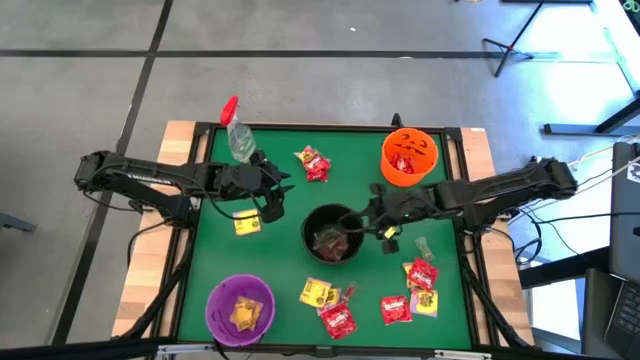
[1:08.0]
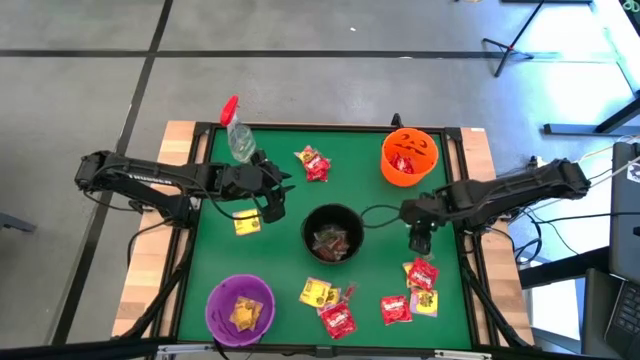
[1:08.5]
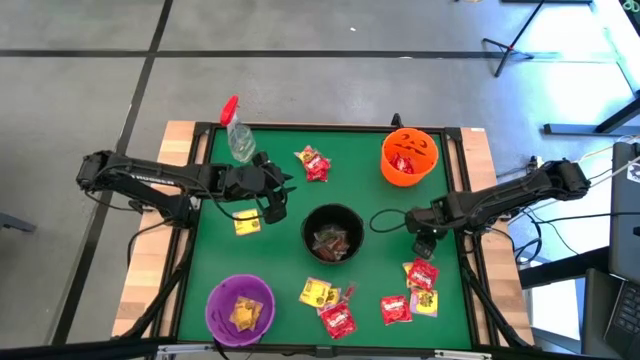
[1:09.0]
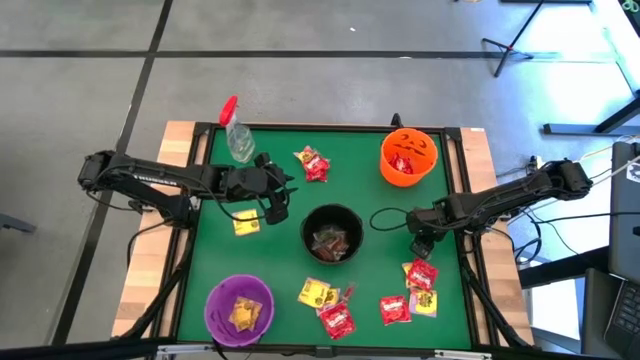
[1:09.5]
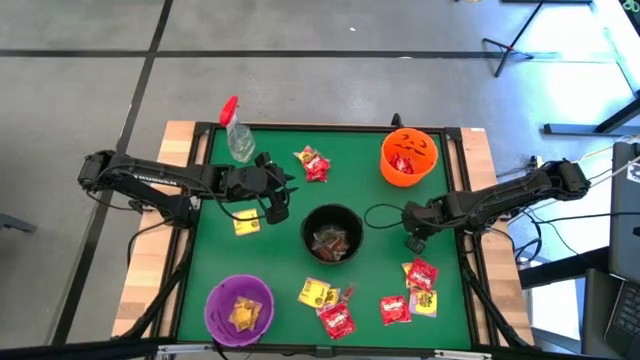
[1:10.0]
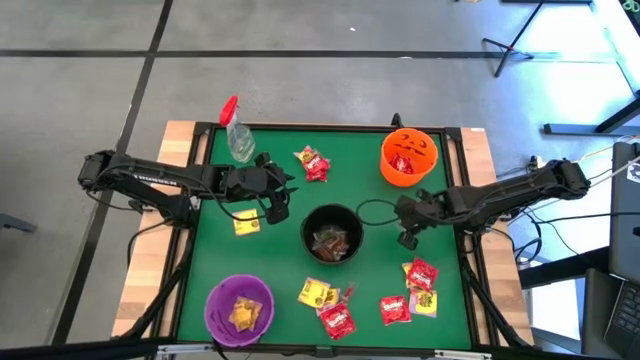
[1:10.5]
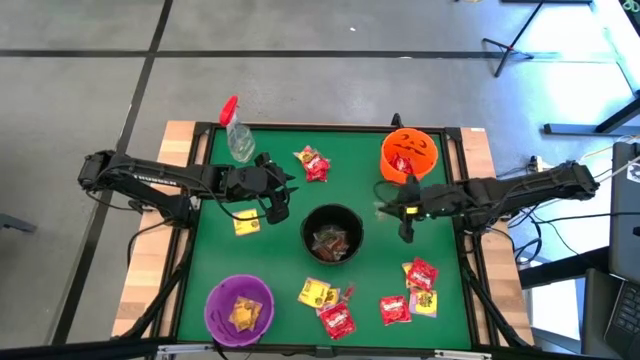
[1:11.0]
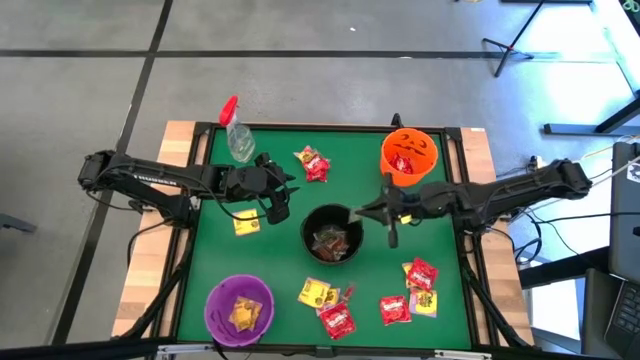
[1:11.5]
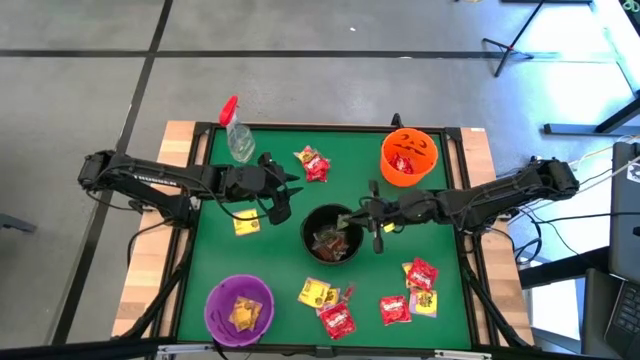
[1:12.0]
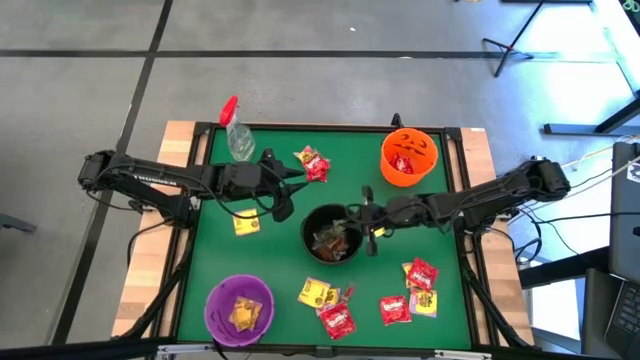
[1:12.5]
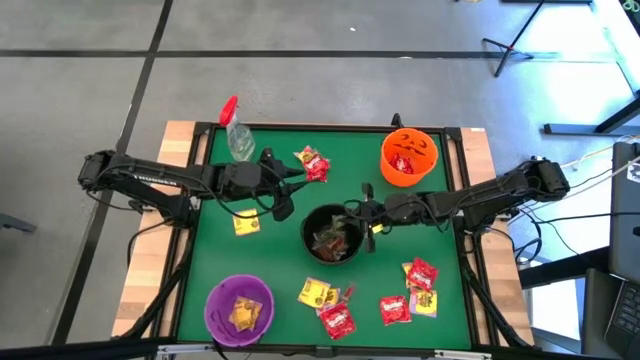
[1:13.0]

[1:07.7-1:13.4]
Task: Sort candy
Put the green candy into the black bucket

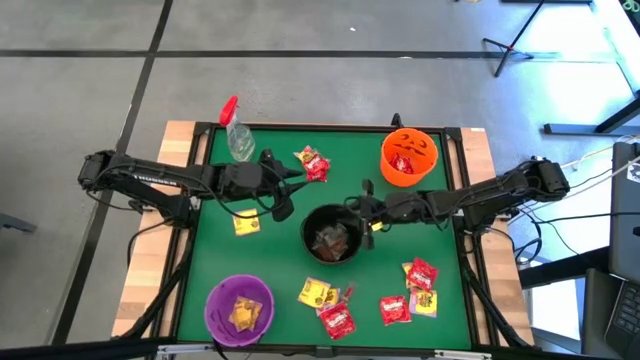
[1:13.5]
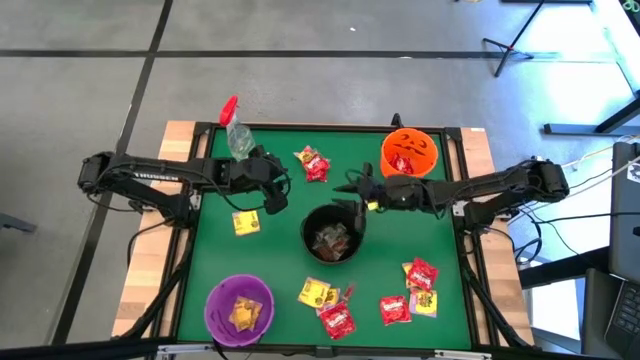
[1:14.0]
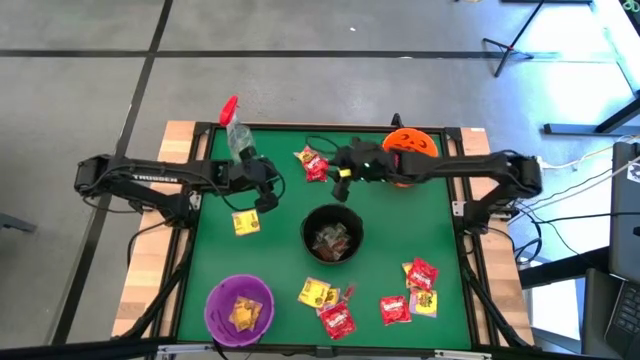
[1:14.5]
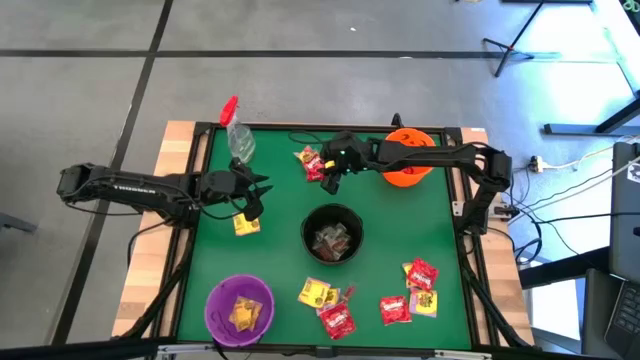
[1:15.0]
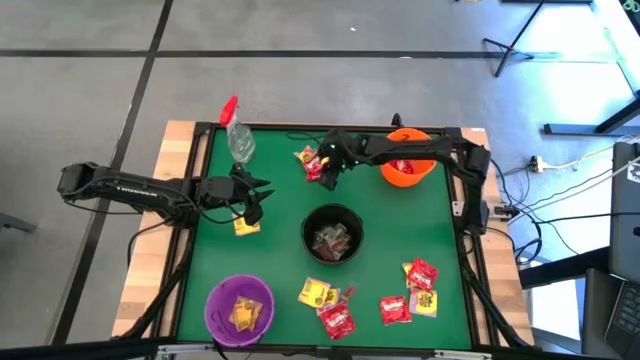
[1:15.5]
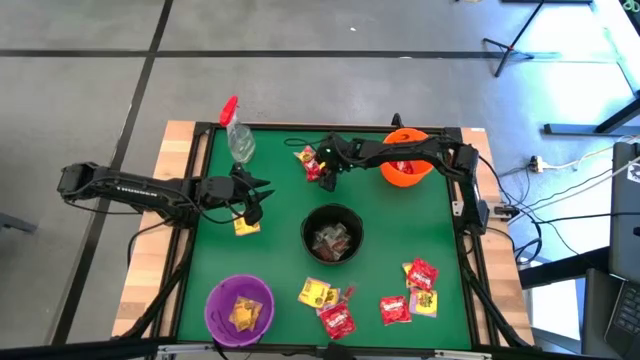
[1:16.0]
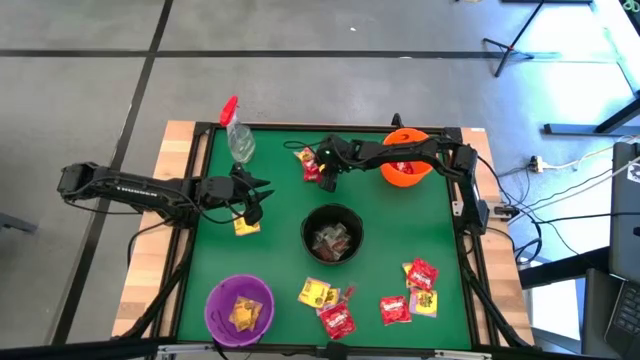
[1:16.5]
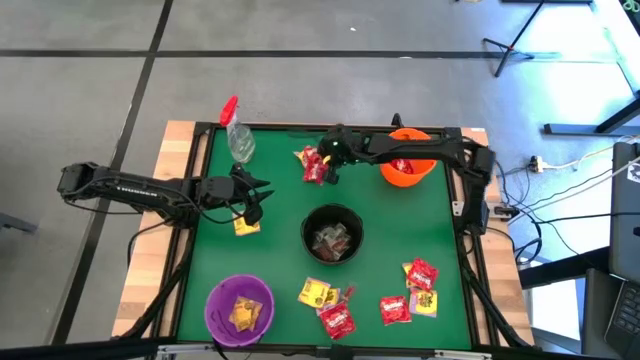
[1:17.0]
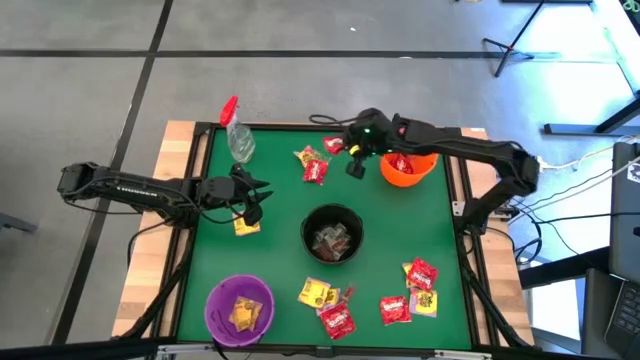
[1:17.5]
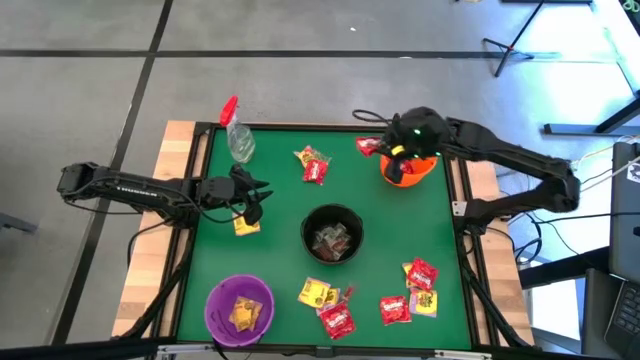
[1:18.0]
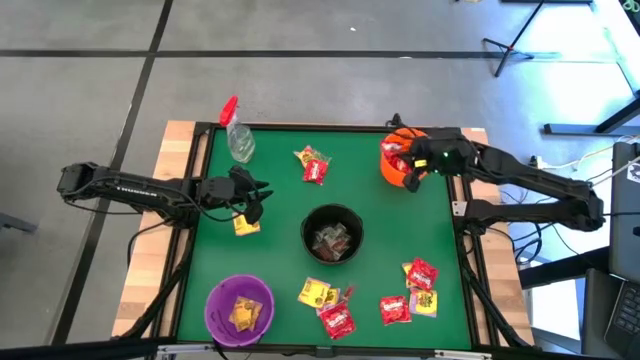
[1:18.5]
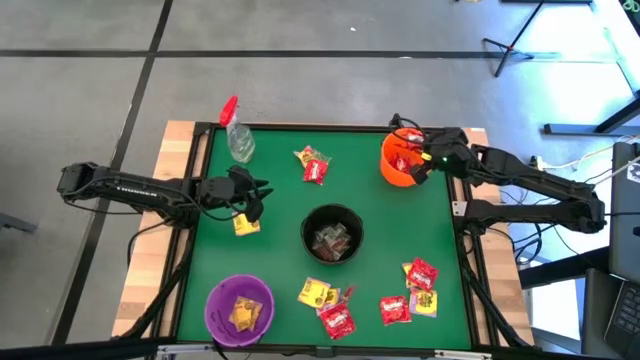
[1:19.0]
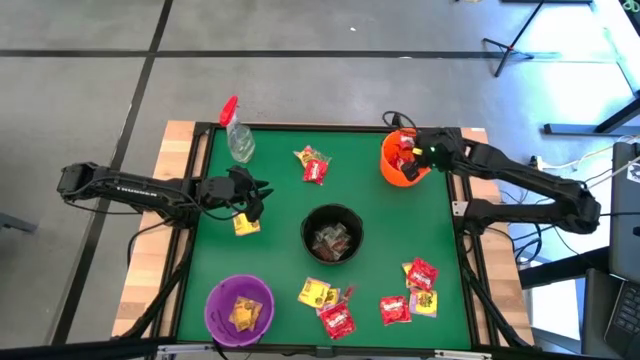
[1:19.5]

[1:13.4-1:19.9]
Put the red candy into the orange bucket

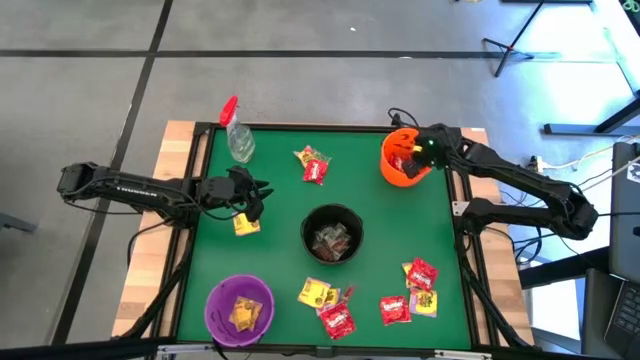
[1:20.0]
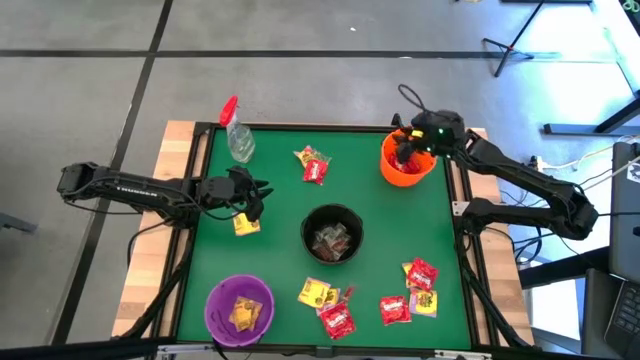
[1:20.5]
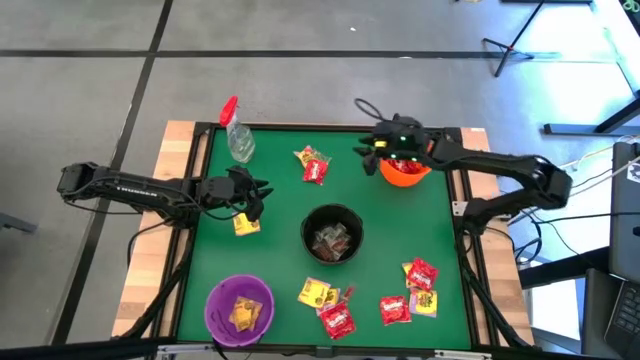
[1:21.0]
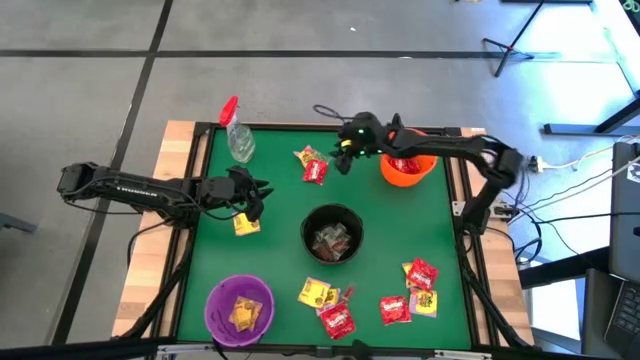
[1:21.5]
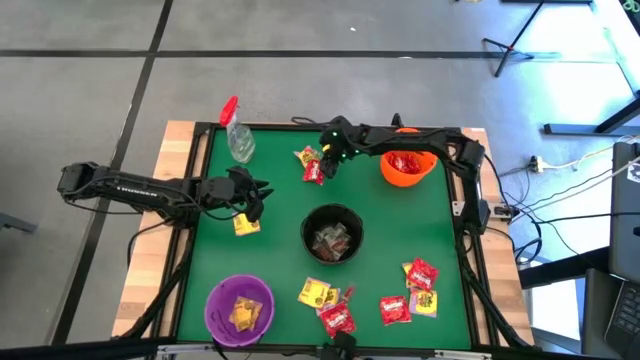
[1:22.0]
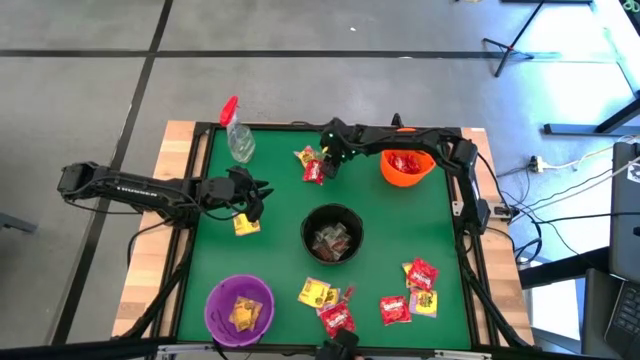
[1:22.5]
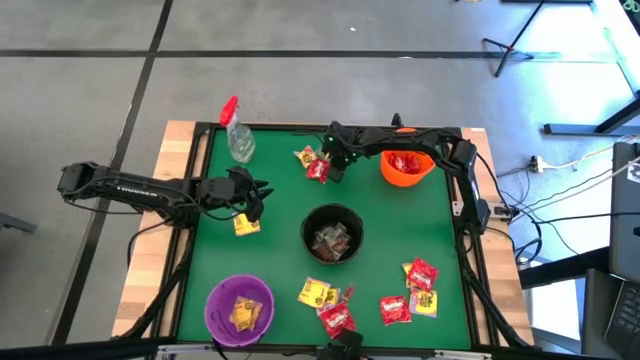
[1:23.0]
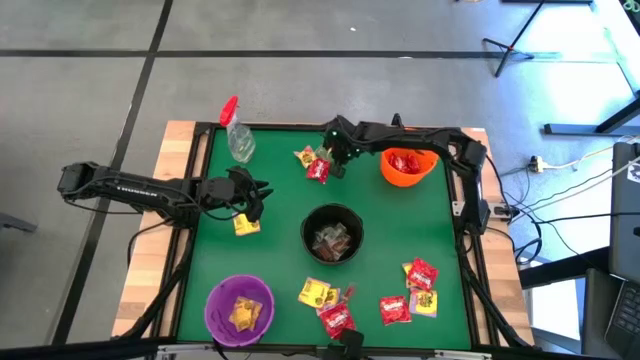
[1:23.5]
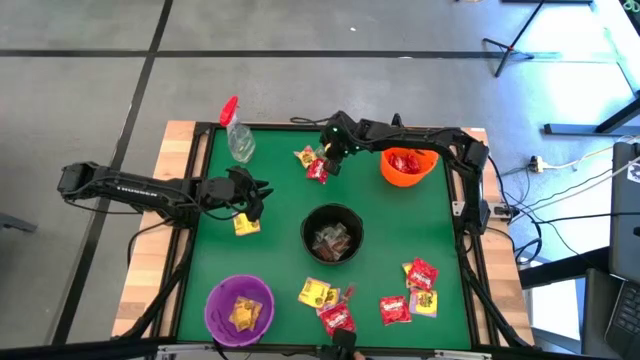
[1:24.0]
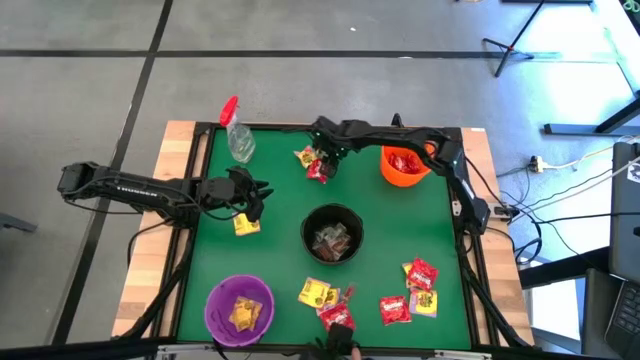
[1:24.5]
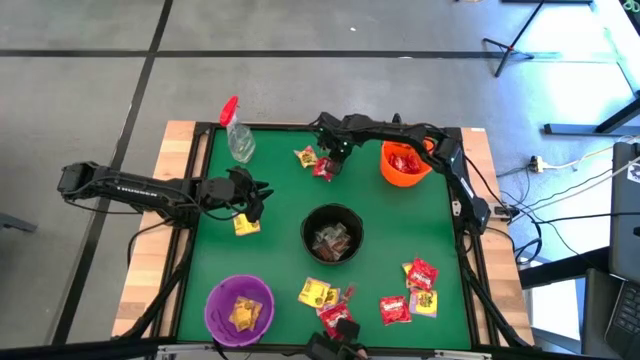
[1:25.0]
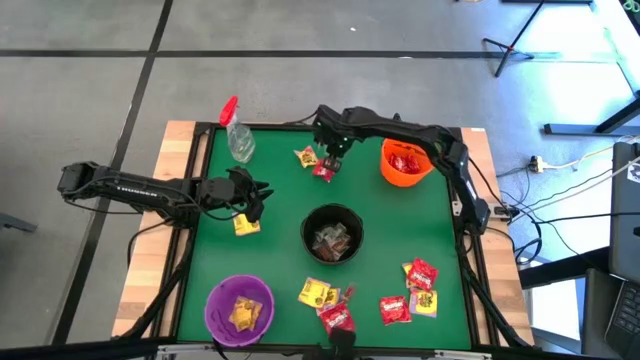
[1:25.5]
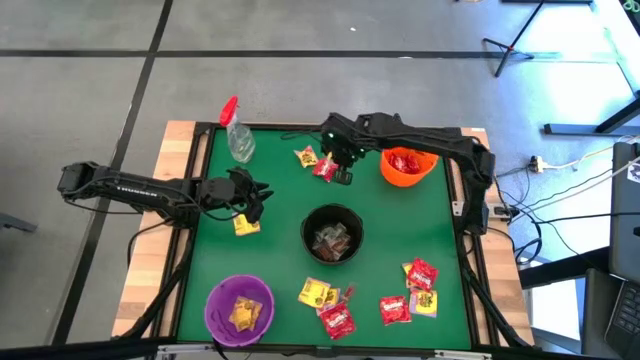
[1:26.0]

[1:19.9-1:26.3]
Put the green candy into the black bucket

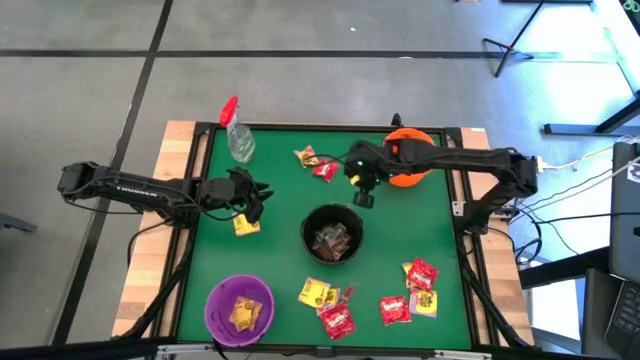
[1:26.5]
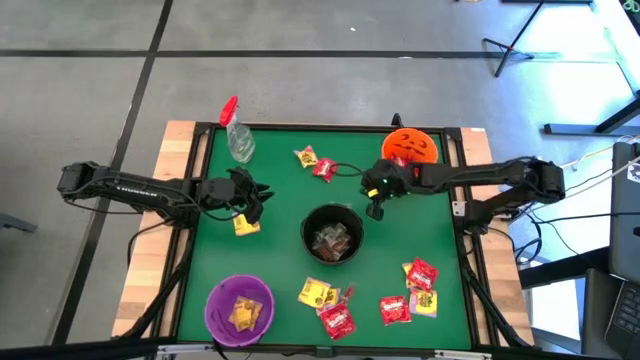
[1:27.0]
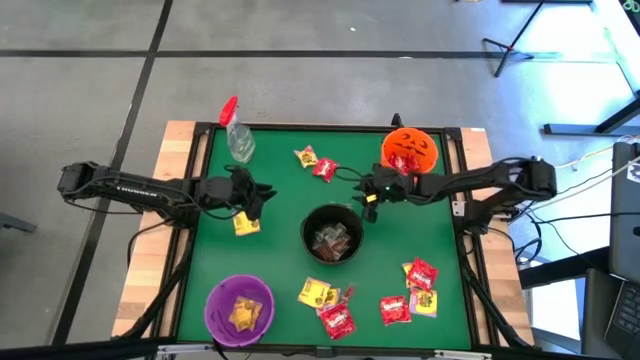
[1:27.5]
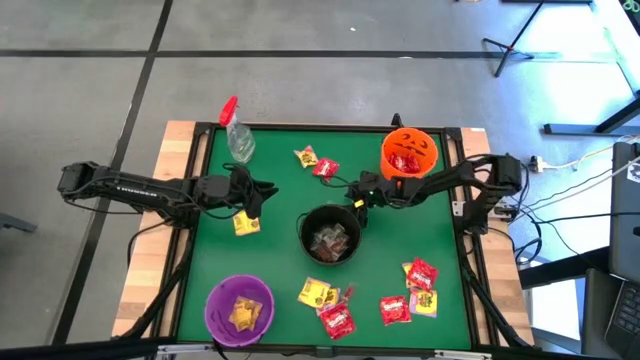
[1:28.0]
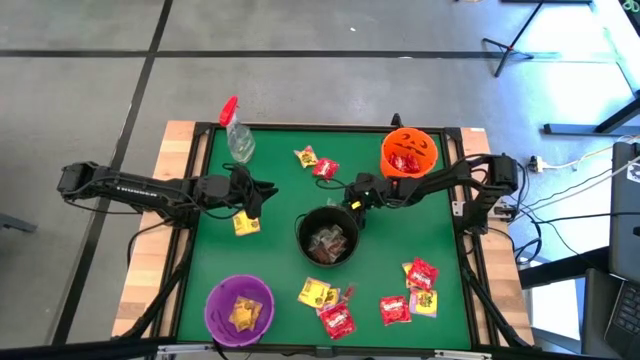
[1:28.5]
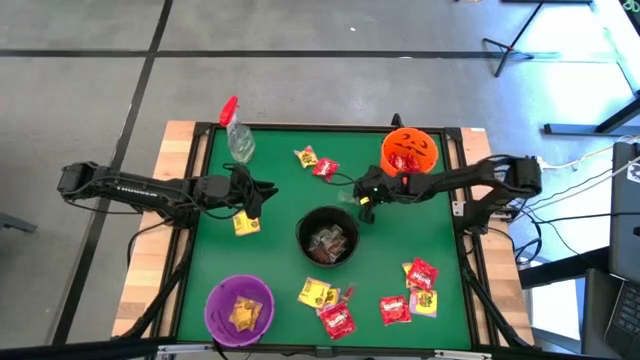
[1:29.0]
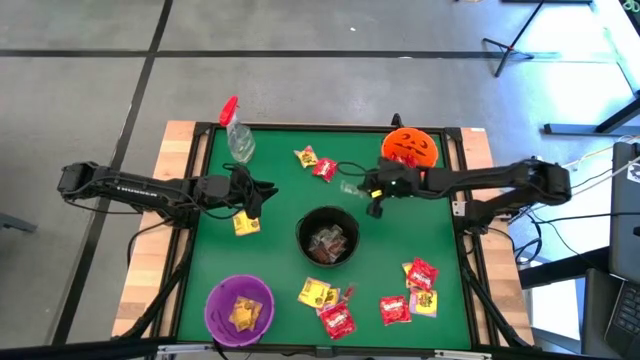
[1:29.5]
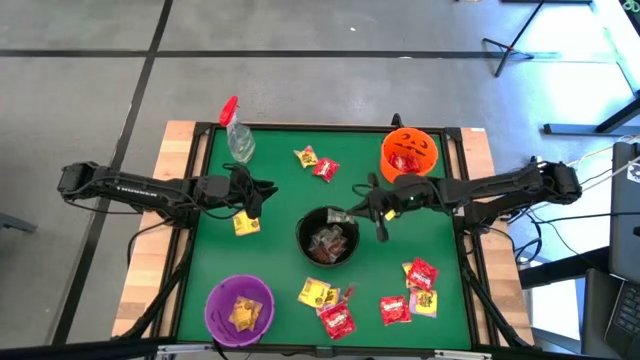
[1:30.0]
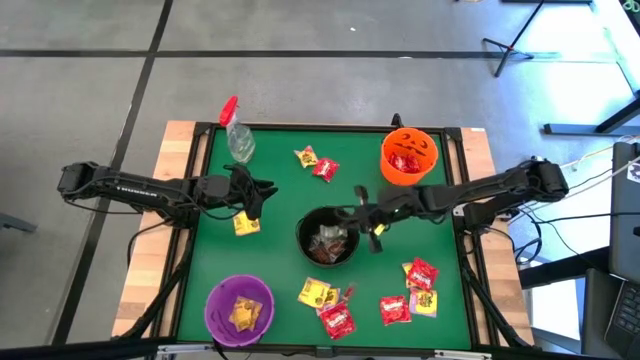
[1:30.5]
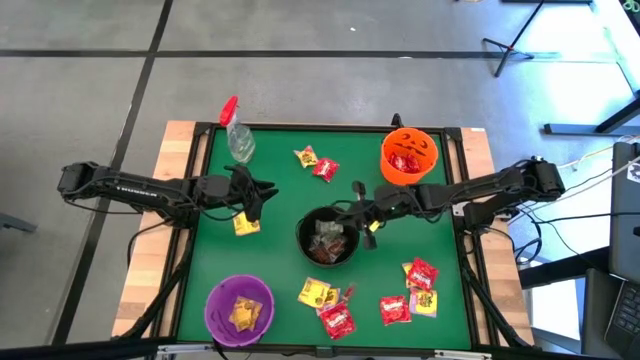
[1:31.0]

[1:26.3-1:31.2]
Put the green candy into the black bucket
